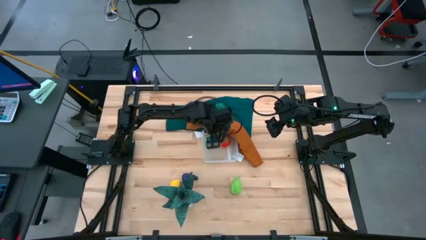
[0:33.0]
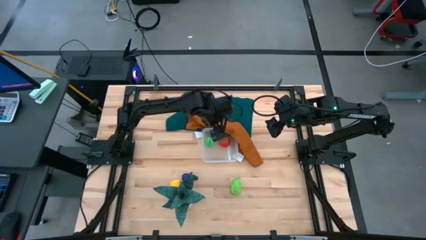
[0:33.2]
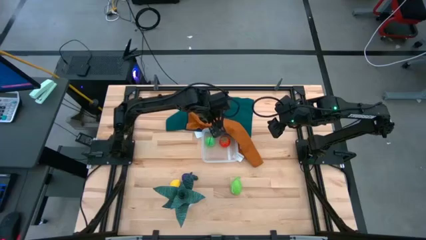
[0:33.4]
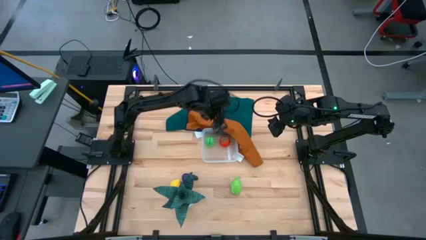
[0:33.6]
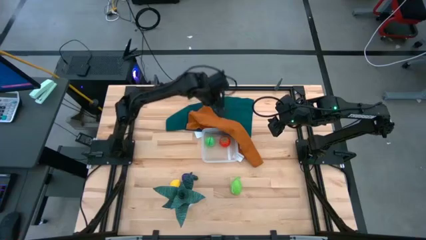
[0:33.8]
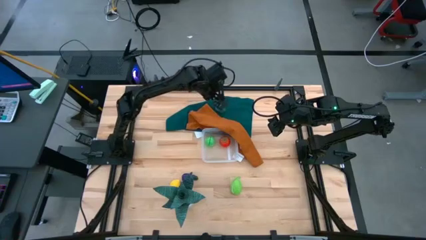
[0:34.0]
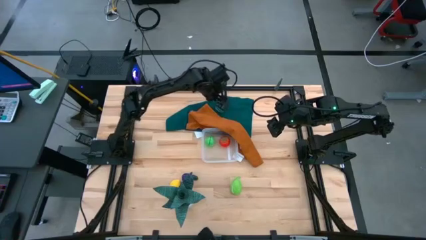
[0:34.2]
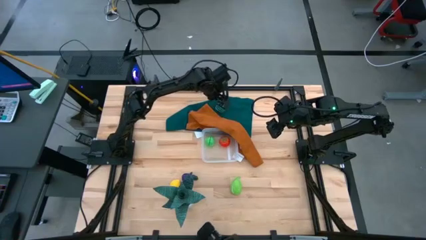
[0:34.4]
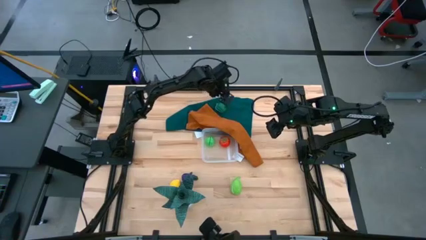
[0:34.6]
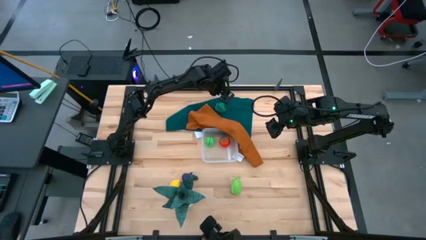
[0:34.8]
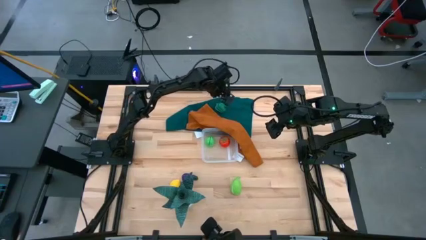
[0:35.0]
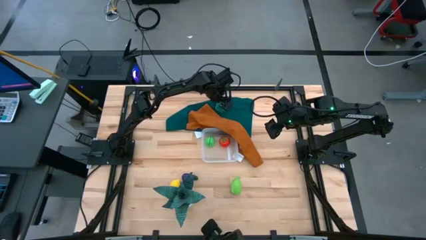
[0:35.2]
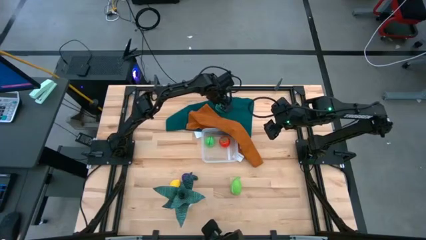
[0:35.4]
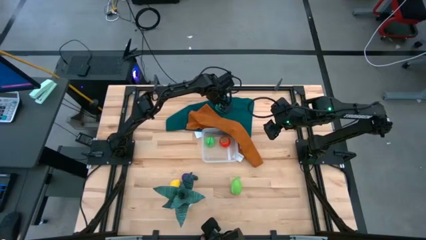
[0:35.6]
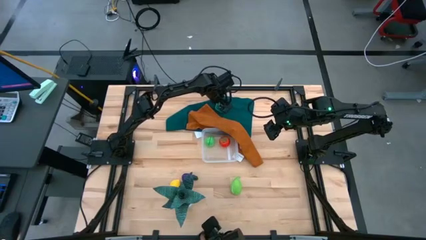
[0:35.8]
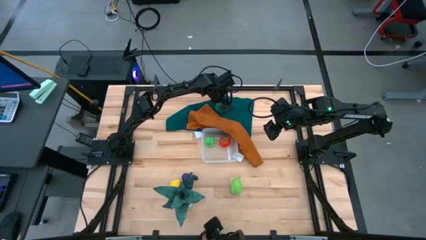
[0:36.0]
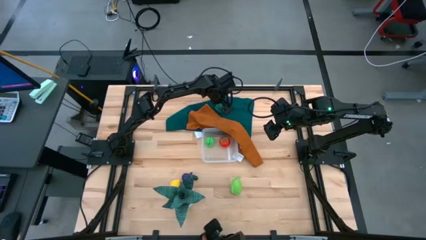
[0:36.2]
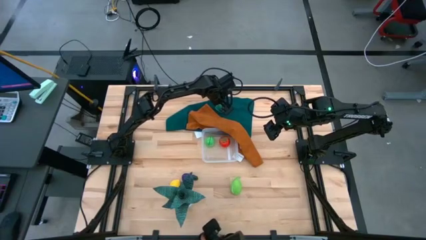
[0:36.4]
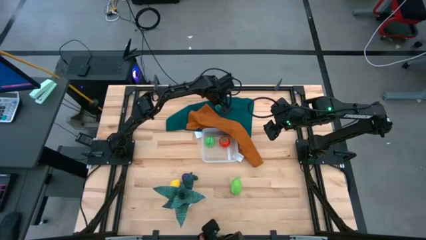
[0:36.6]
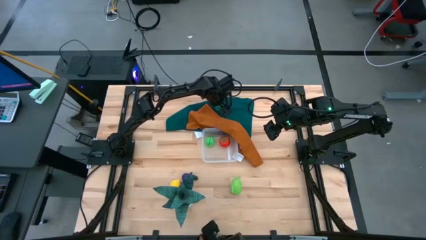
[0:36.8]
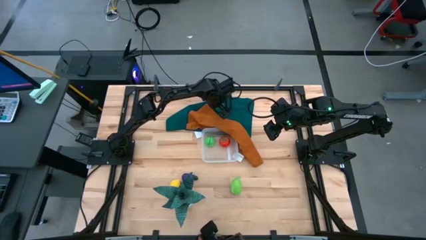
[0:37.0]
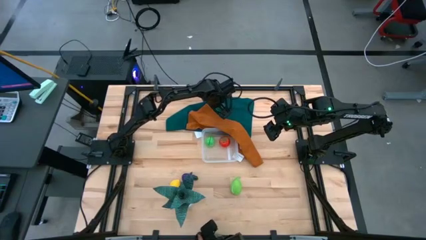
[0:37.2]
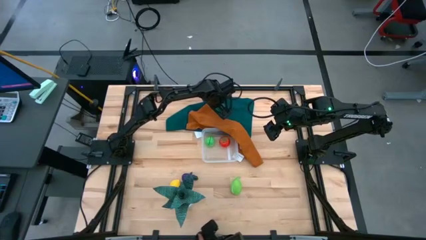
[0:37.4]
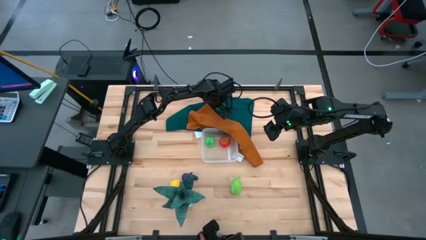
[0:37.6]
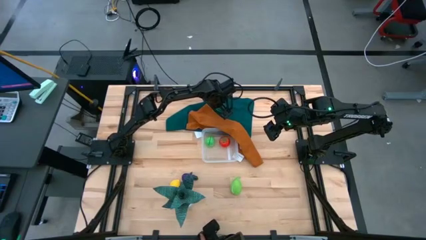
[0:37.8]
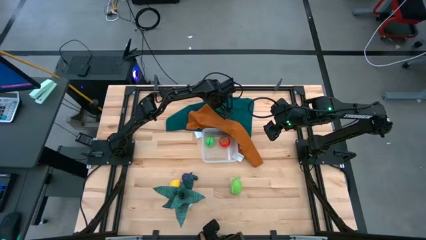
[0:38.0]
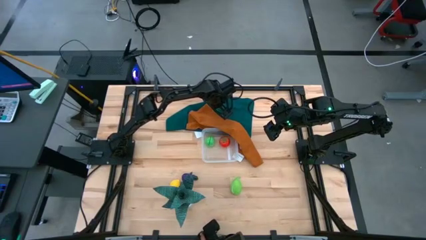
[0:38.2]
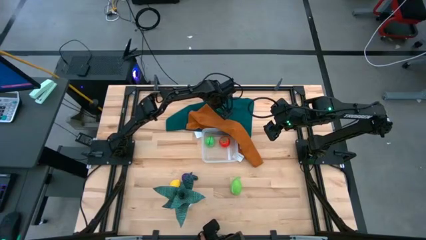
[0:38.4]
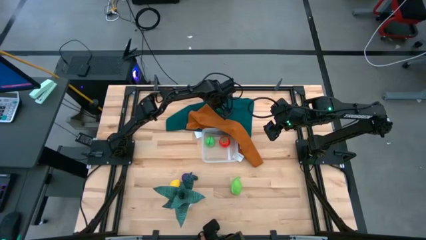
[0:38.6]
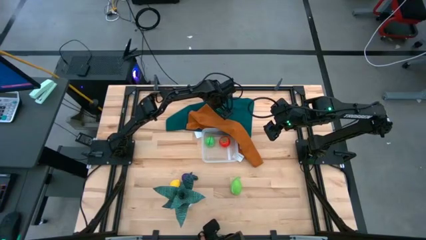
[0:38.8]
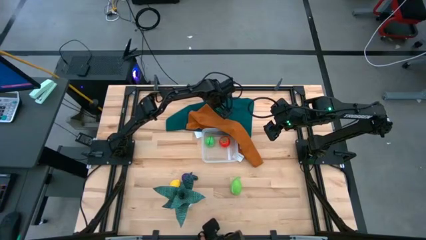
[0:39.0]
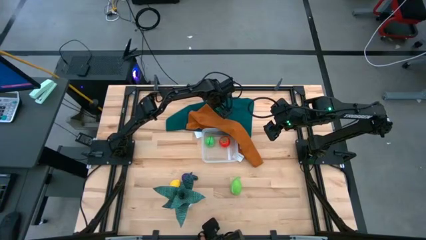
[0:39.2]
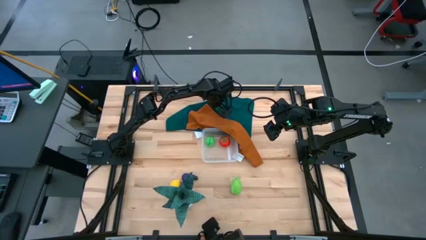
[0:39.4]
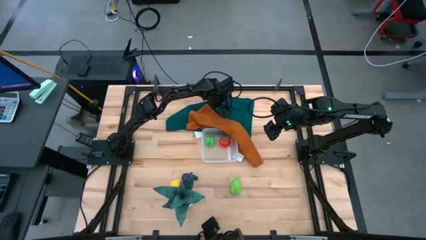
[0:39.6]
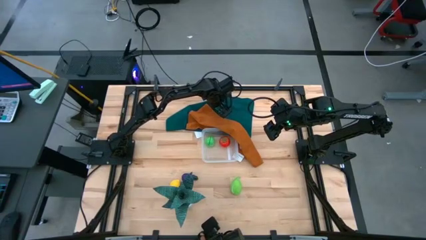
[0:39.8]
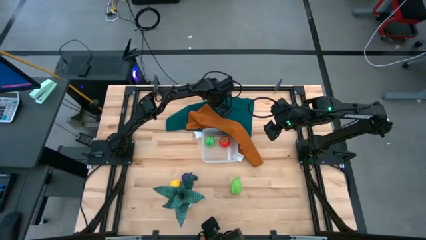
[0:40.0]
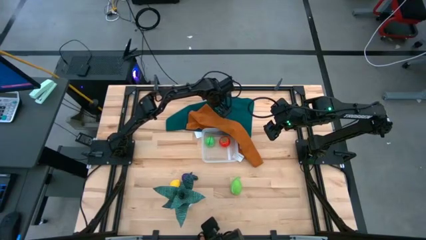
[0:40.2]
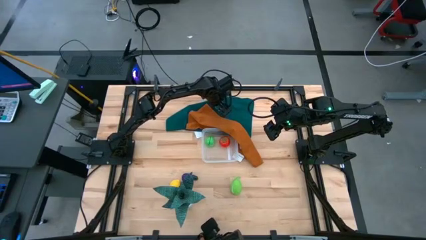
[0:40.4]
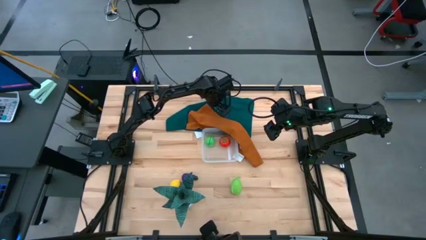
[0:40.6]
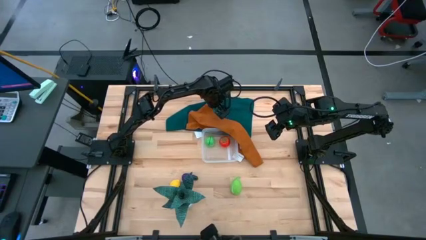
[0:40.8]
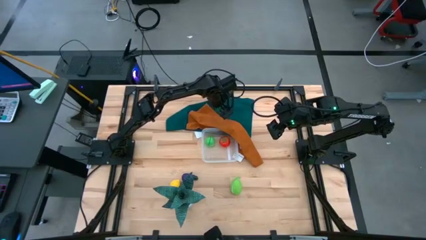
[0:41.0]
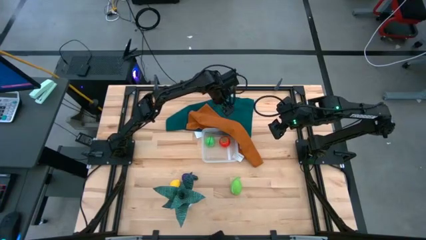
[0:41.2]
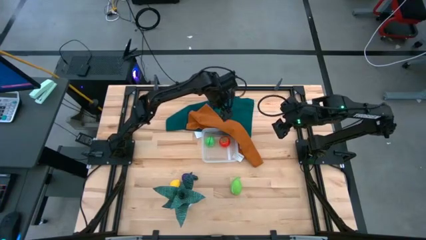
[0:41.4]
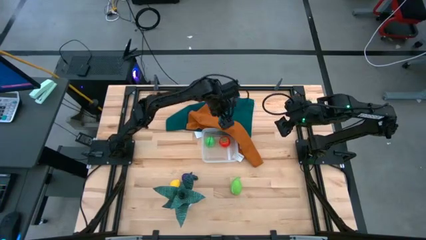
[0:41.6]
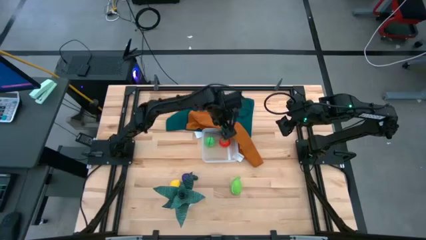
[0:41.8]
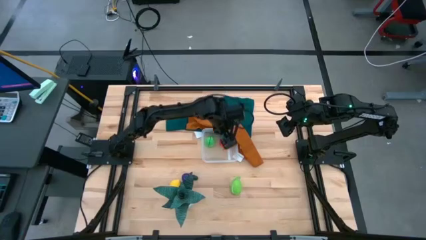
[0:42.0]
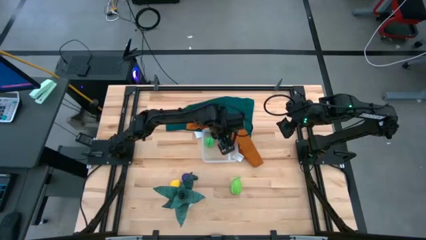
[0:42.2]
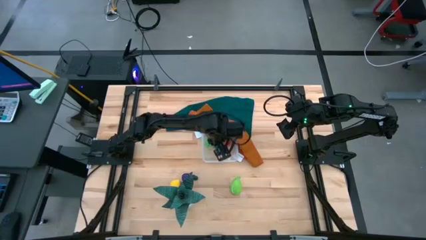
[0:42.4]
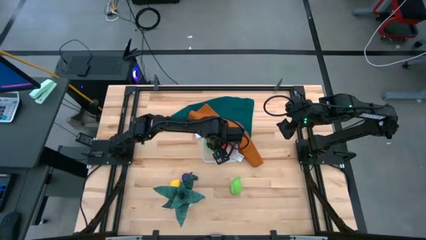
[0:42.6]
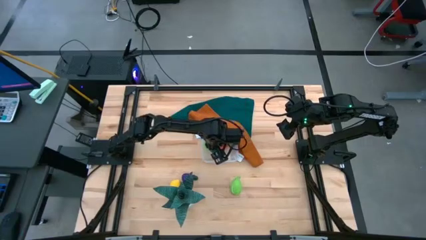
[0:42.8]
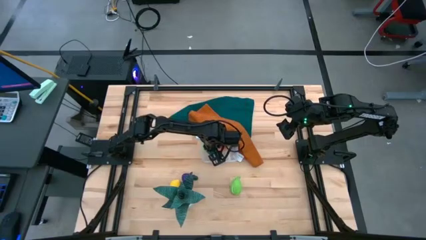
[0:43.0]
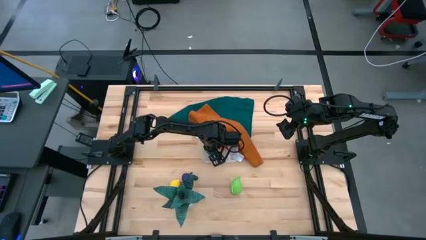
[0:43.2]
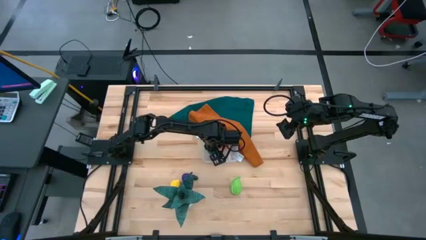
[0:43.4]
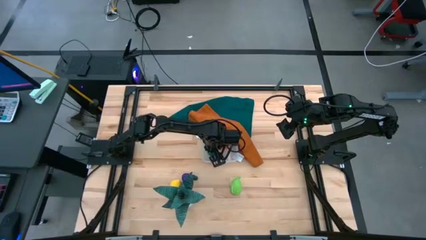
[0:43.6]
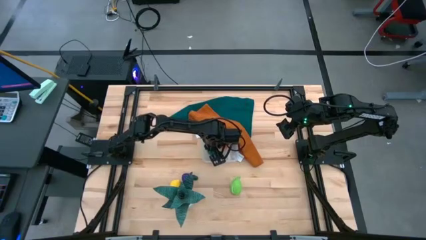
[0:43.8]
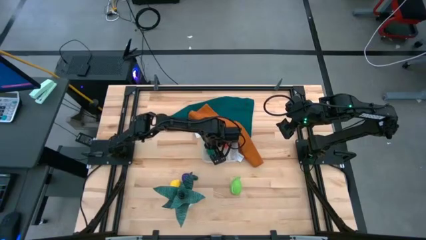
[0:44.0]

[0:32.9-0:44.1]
Task: Pick and placing Produce into tupperware
Put the green bell pepper into the transparent bin

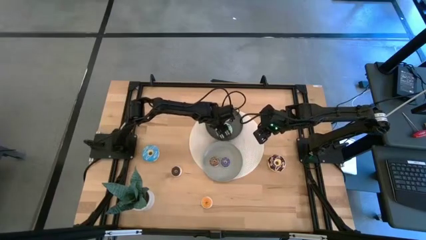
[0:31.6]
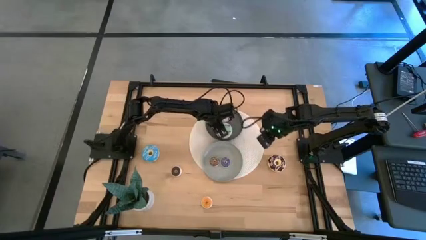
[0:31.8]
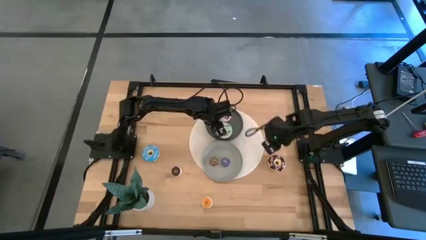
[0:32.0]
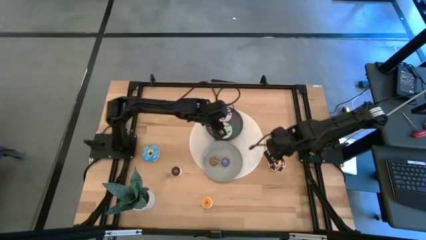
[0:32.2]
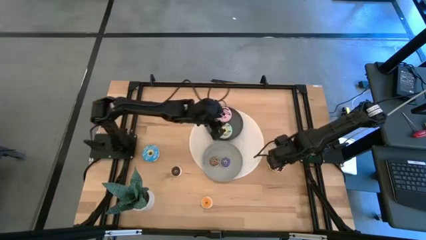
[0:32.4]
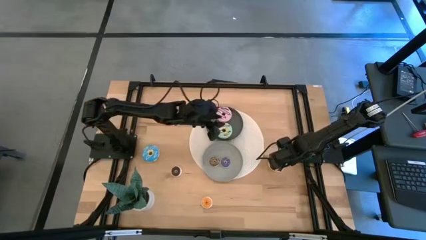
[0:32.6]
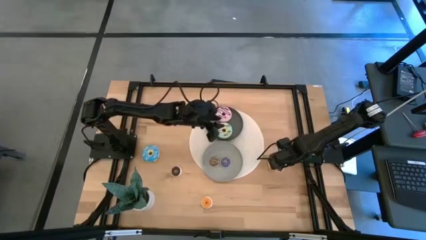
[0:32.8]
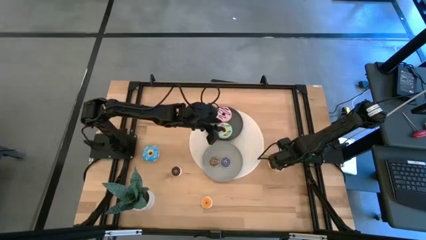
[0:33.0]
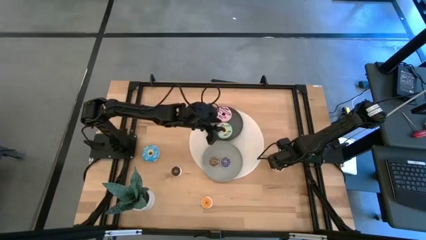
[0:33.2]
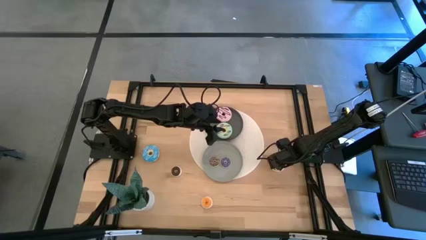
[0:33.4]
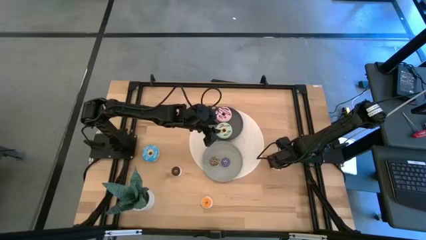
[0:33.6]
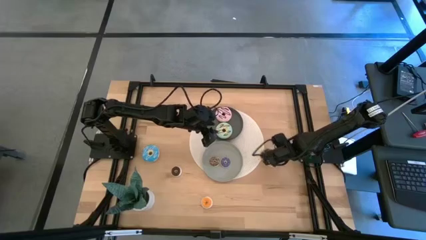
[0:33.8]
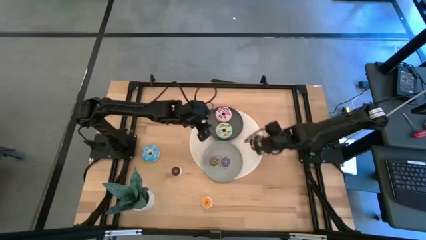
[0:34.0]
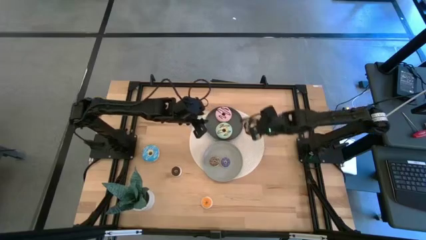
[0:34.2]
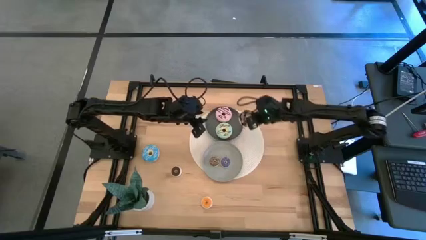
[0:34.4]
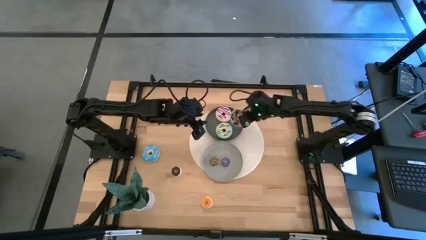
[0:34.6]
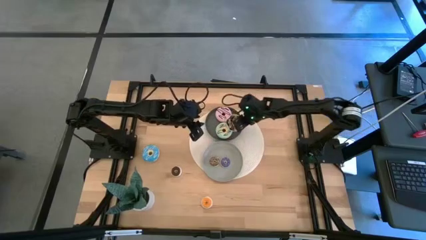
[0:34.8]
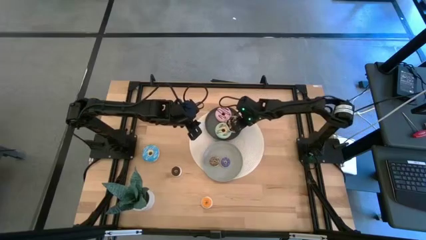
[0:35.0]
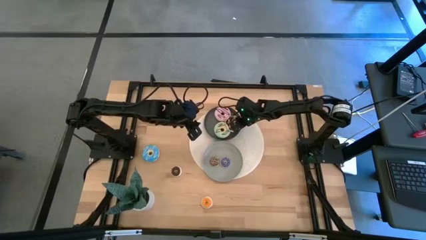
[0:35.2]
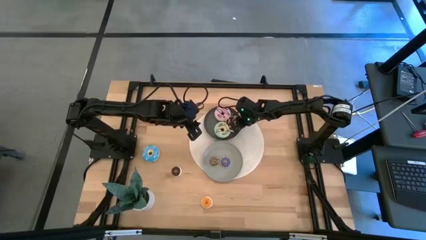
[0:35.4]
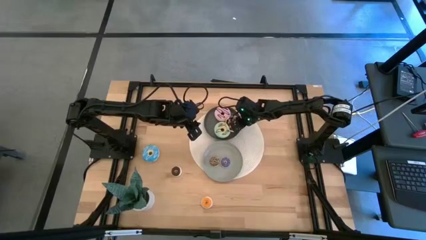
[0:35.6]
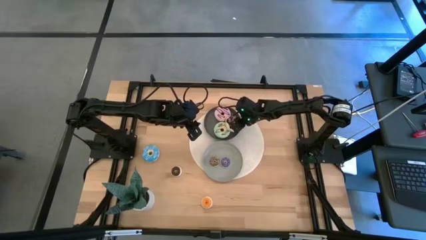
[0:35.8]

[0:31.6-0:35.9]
Task: Pick & Place donuts
Put the big black donut on the black plate
